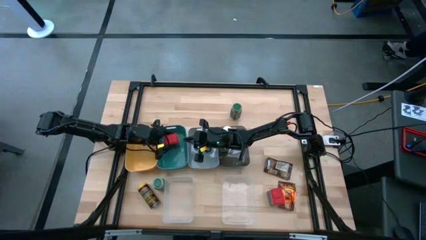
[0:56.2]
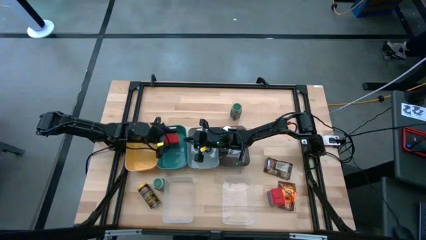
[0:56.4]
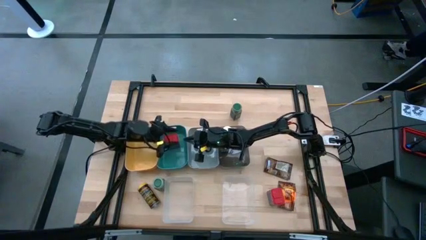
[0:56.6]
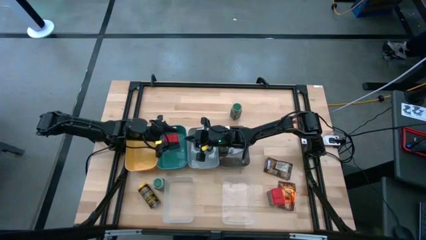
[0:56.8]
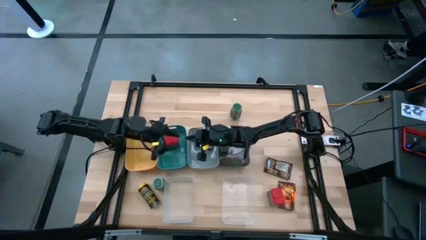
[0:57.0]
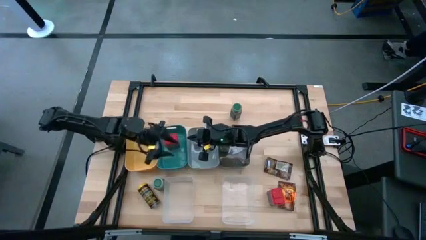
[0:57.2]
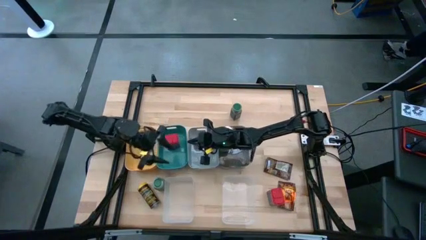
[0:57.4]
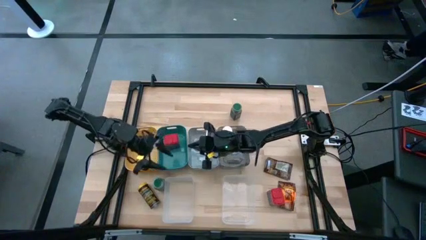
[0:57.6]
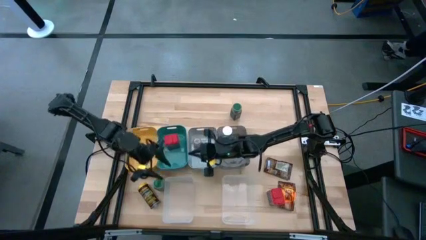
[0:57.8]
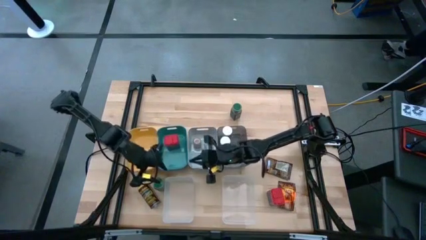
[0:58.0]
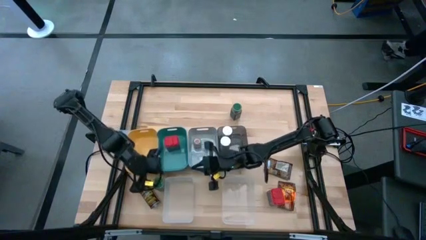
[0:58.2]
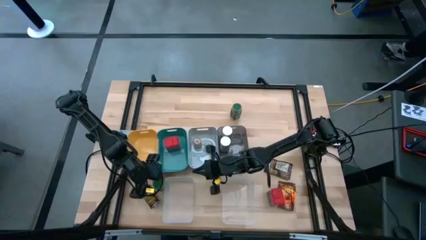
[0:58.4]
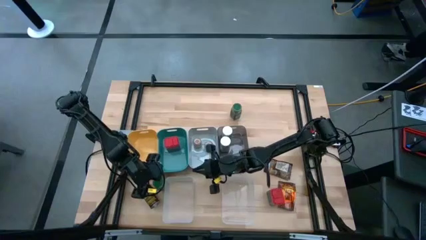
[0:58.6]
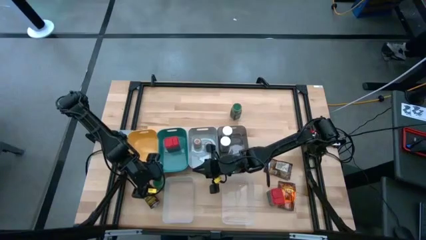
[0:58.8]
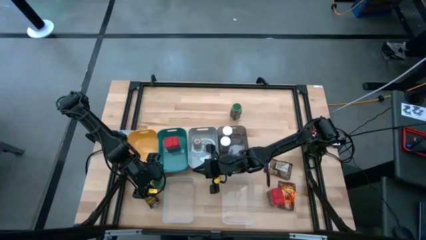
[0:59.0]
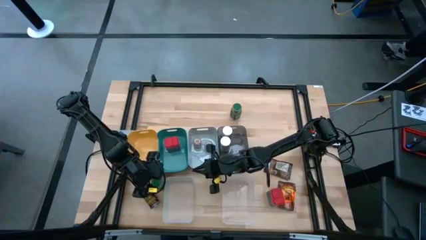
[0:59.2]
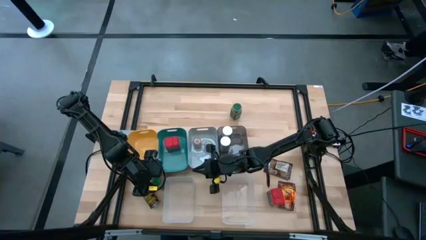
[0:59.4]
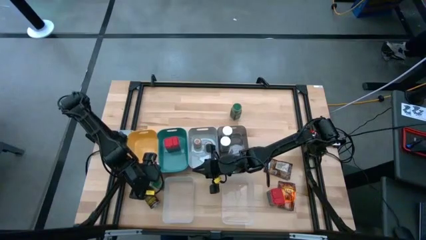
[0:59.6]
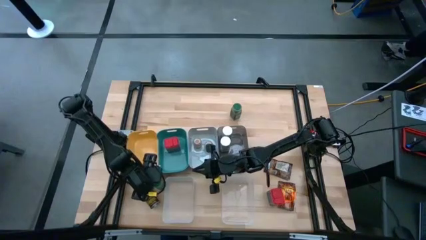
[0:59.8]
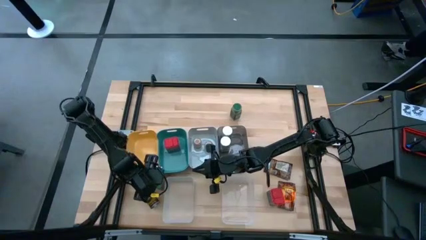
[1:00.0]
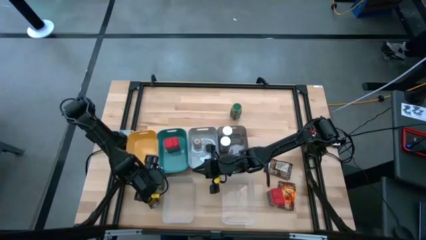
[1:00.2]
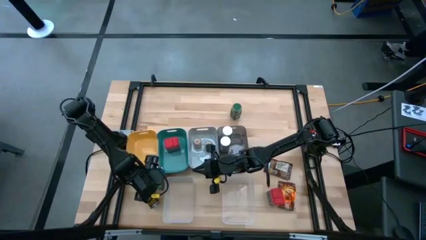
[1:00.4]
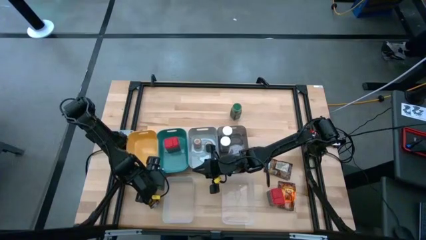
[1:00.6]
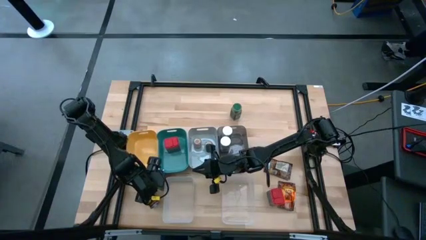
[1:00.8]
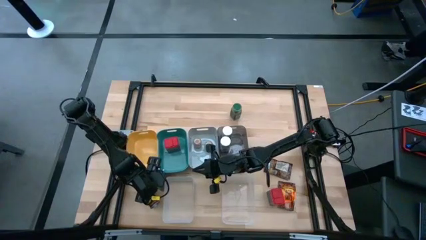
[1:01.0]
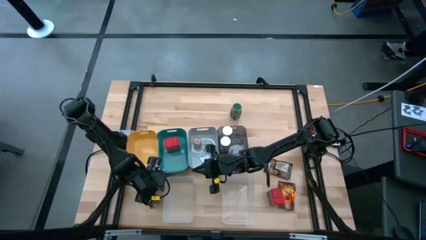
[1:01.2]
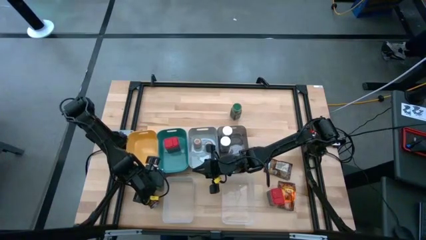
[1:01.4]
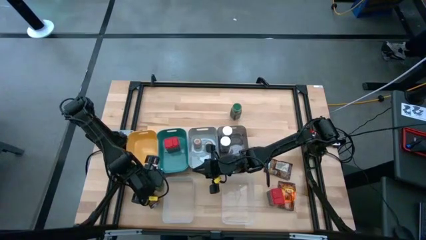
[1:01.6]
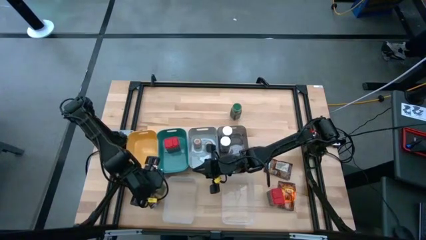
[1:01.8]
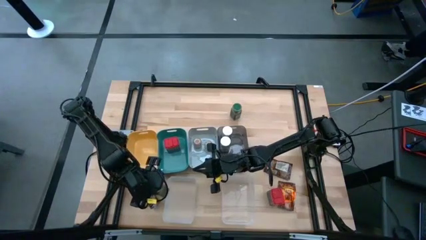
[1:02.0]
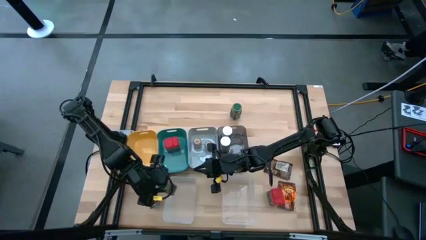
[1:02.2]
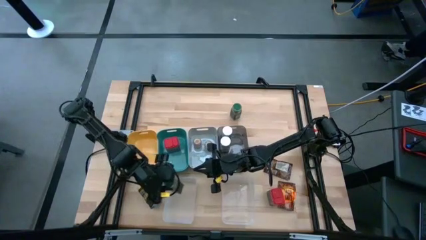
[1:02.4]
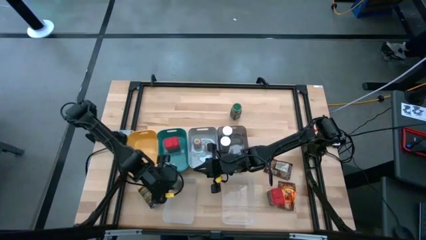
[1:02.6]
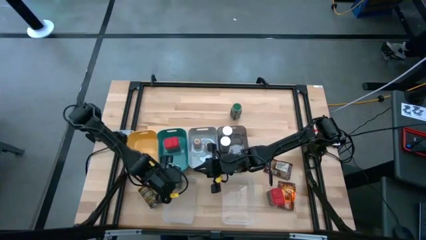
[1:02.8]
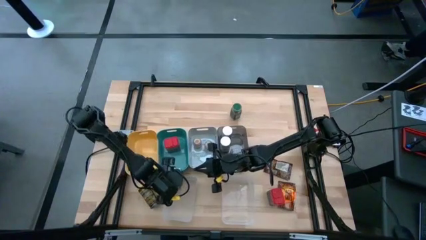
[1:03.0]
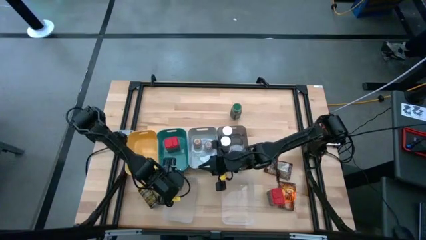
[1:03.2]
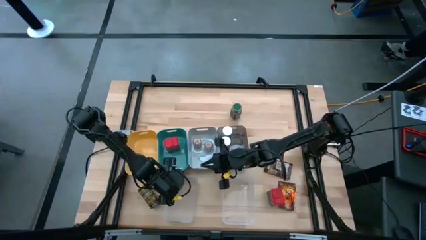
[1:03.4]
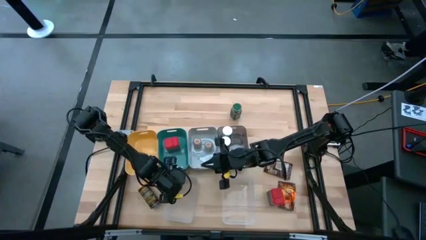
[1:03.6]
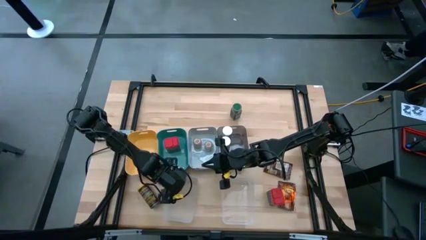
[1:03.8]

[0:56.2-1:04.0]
Task: Sort spices by type
Put the bottom green seasoning bottle into the left transparent bin

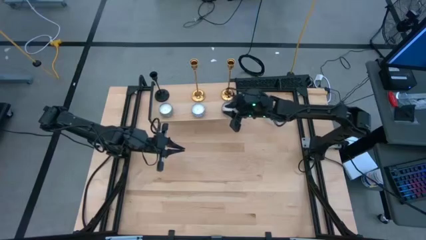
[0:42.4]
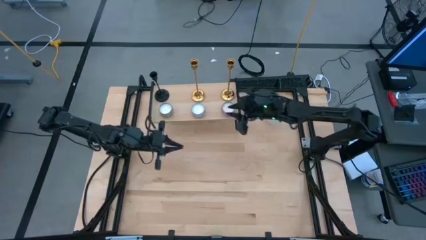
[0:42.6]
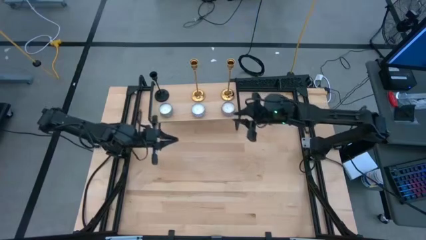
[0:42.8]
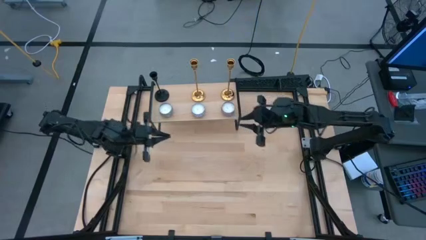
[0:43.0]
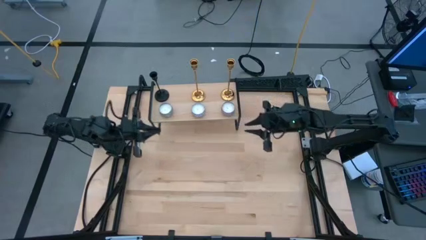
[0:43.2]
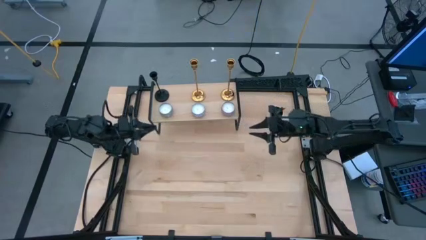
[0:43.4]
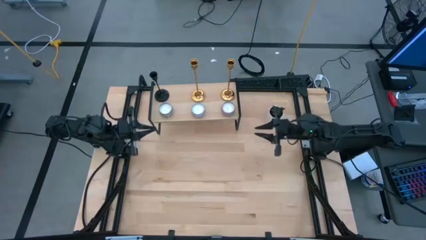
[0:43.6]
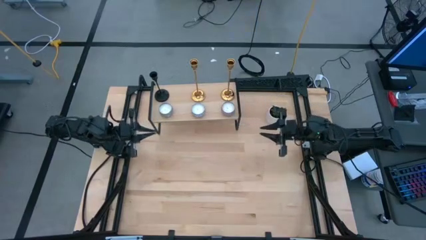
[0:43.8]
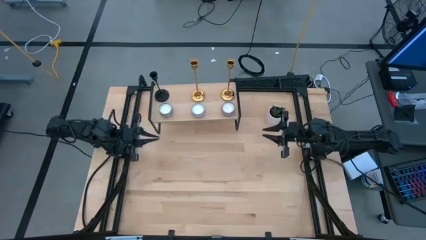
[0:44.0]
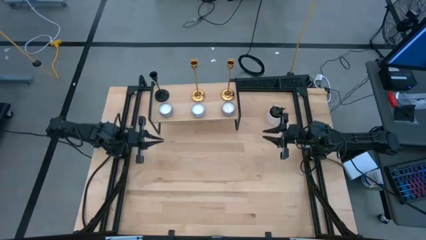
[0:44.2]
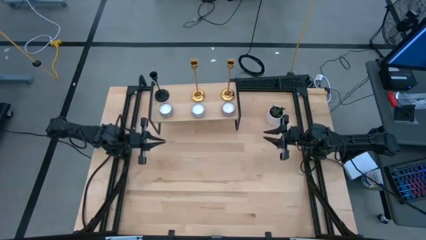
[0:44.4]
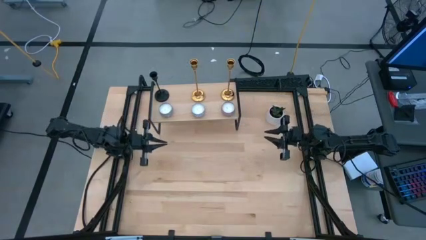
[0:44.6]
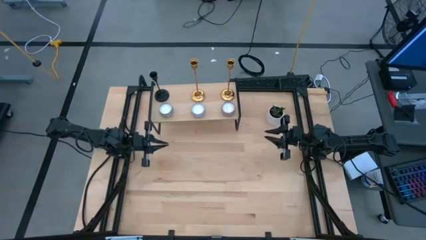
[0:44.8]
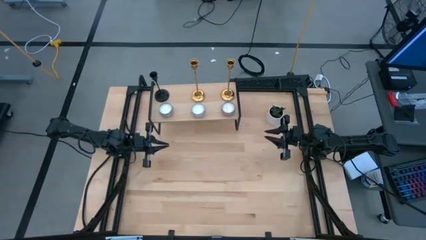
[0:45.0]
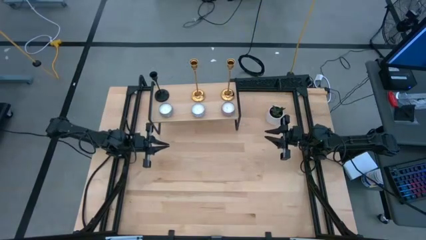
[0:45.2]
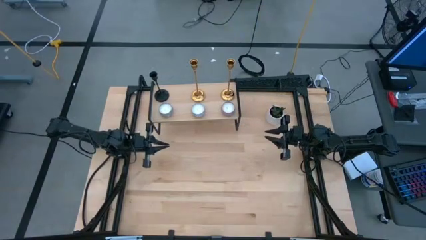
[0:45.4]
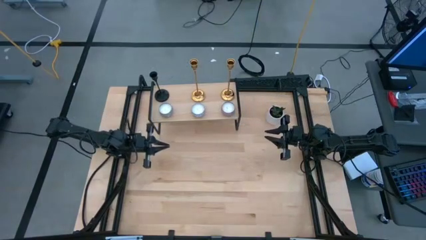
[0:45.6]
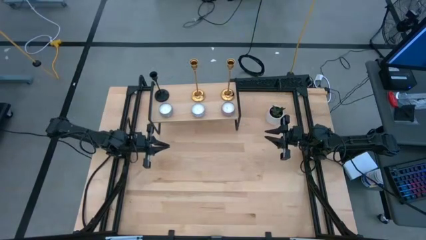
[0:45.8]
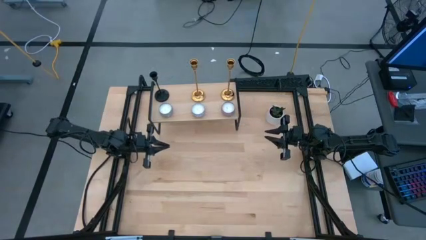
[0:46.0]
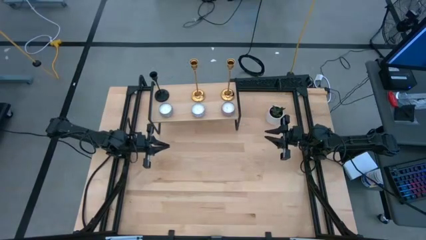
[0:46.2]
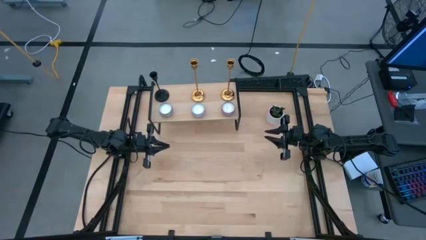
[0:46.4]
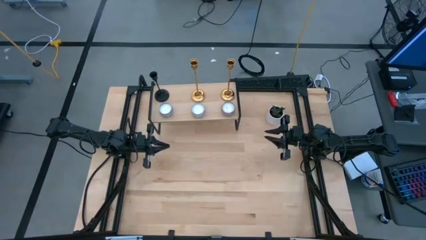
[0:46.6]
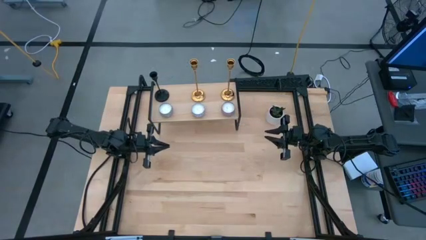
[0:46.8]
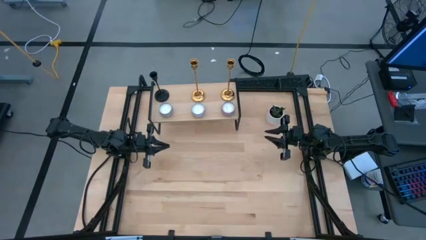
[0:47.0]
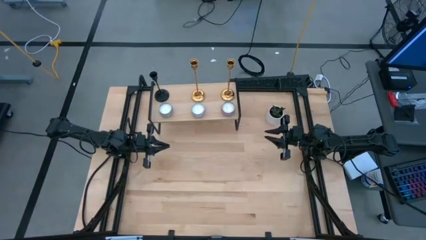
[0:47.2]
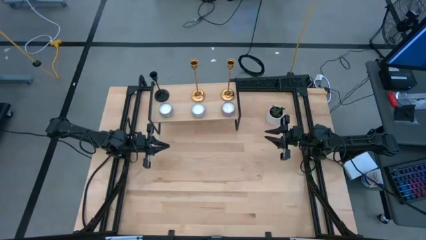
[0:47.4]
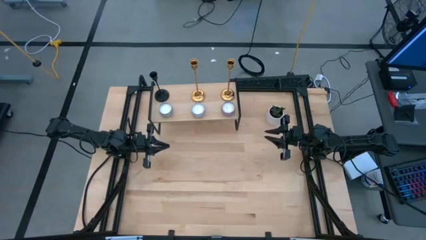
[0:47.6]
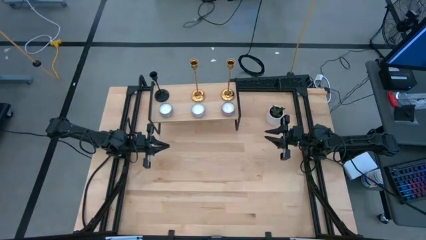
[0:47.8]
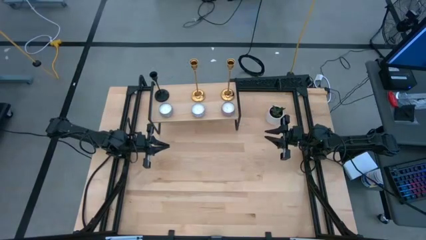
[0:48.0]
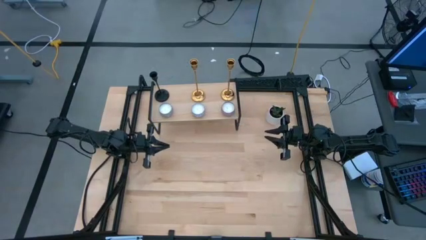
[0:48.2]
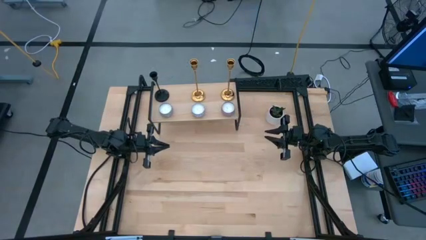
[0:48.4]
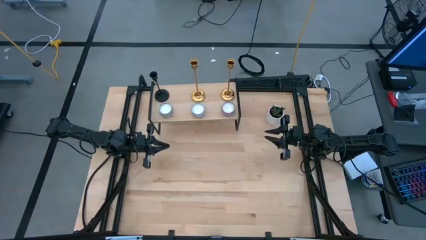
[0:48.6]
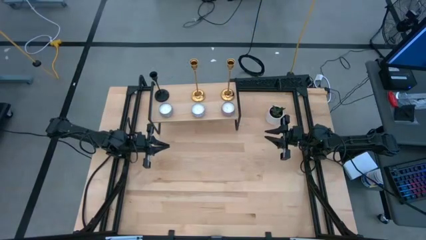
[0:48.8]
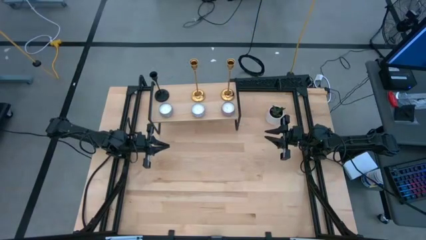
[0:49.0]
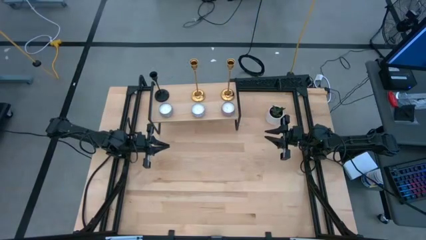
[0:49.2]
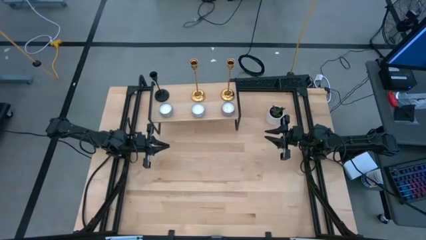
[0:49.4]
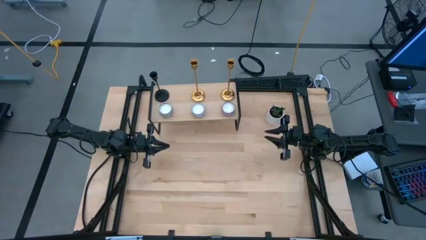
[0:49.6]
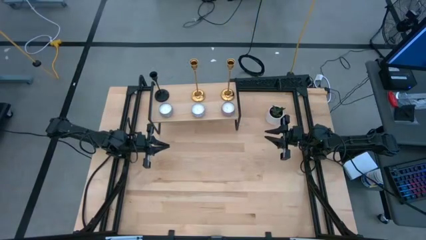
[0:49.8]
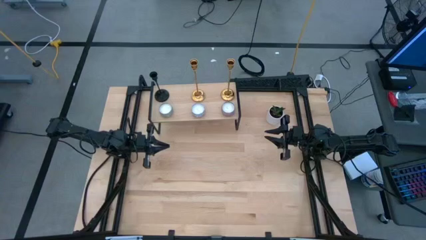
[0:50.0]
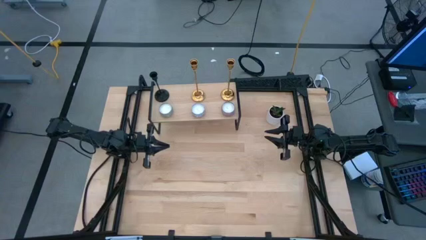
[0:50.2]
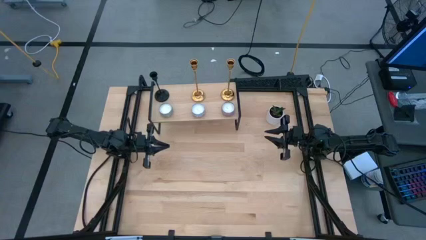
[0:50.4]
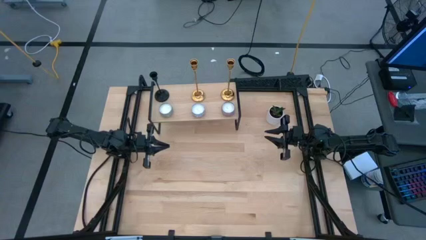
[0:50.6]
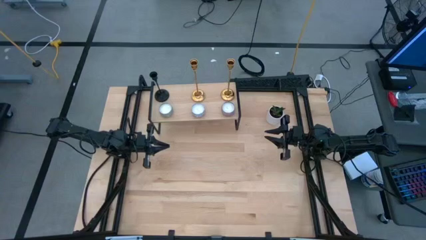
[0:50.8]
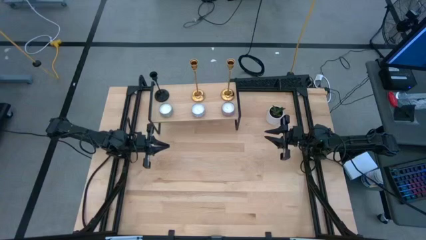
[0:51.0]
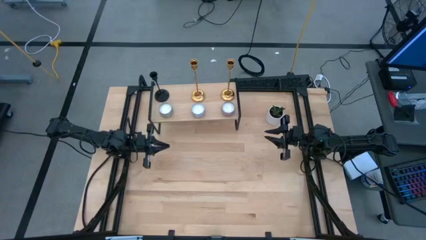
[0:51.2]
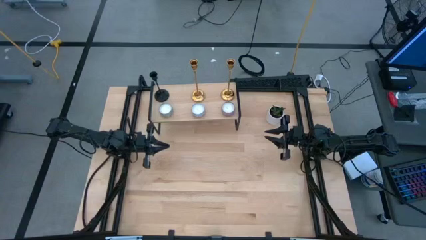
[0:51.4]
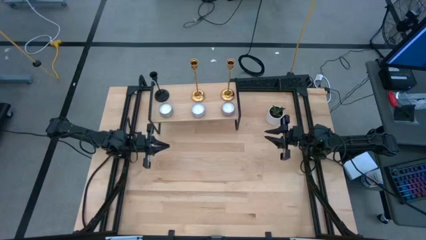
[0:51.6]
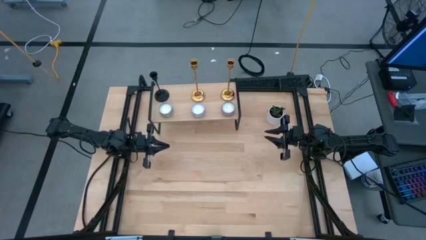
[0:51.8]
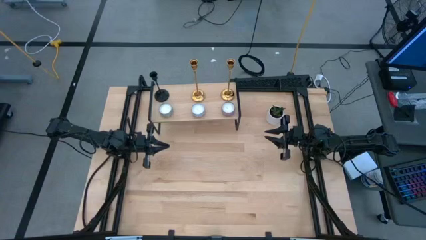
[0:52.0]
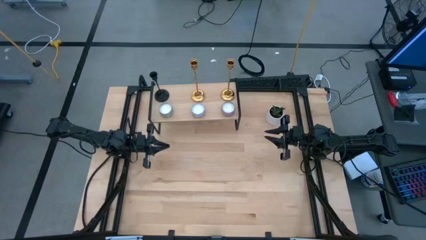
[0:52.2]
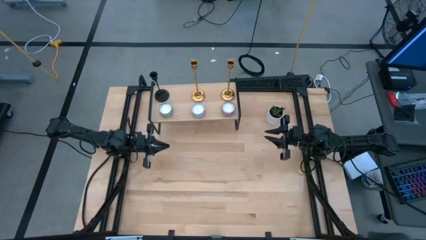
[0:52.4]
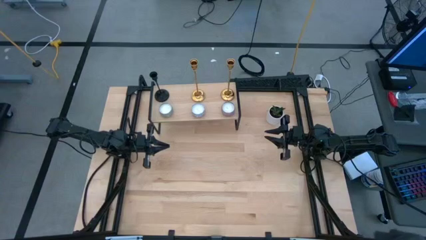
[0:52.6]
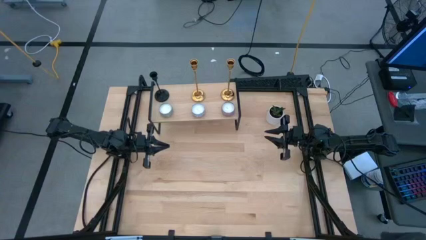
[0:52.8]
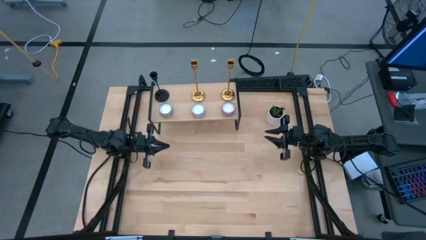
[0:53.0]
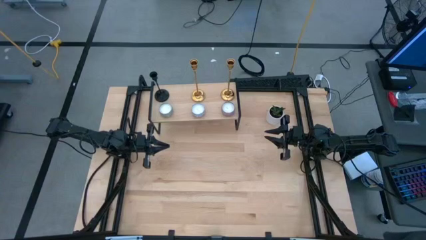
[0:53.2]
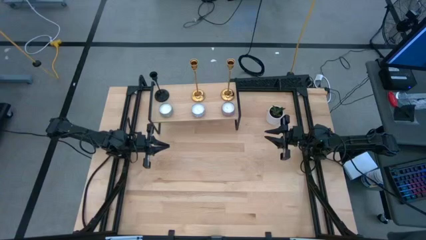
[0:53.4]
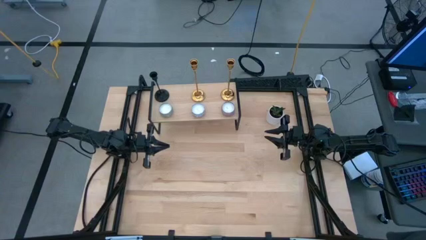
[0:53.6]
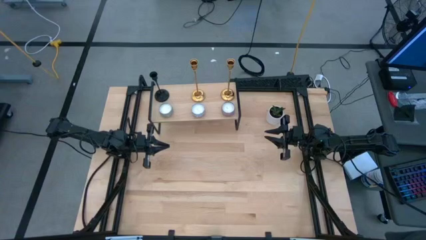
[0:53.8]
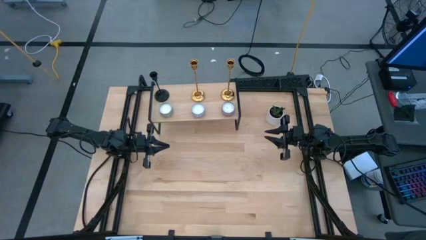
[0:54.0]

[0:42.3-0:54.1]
Task: Pick & Place candle stick holders
Return to Home Position
